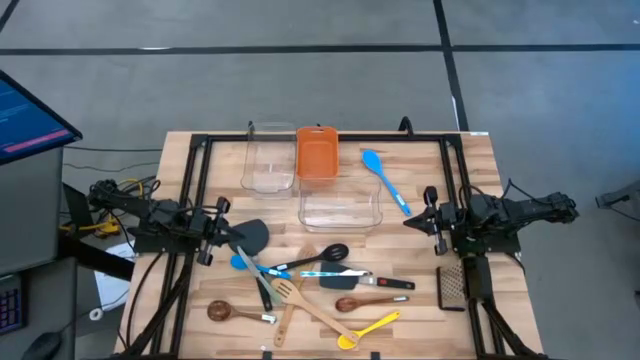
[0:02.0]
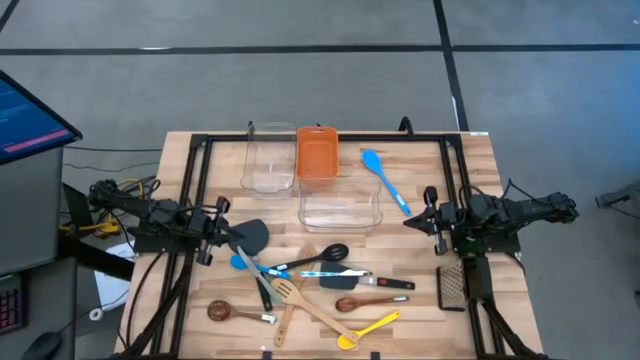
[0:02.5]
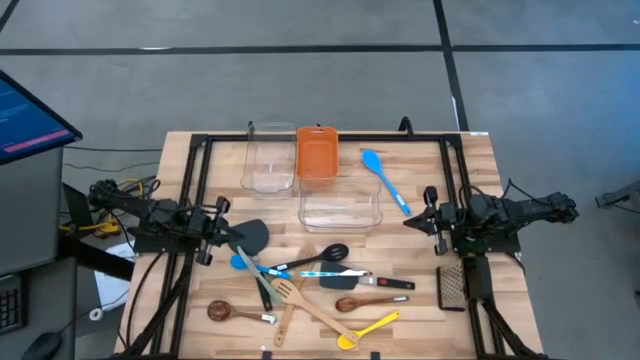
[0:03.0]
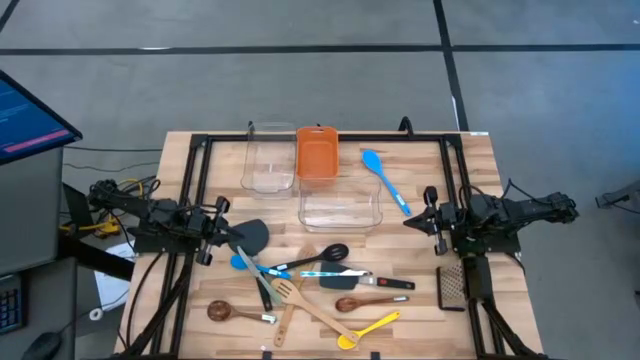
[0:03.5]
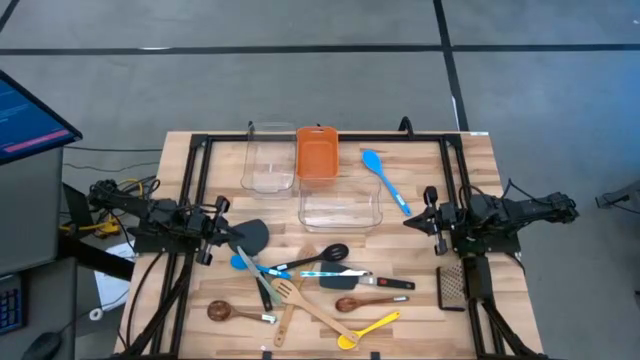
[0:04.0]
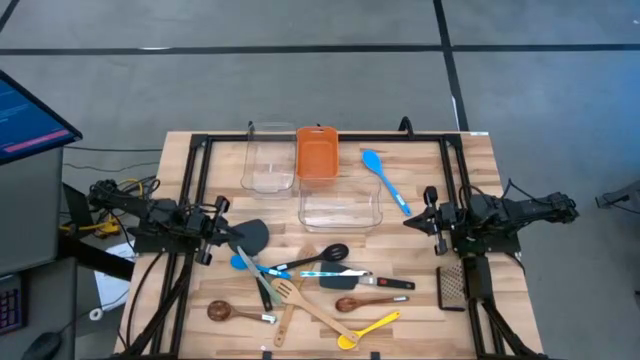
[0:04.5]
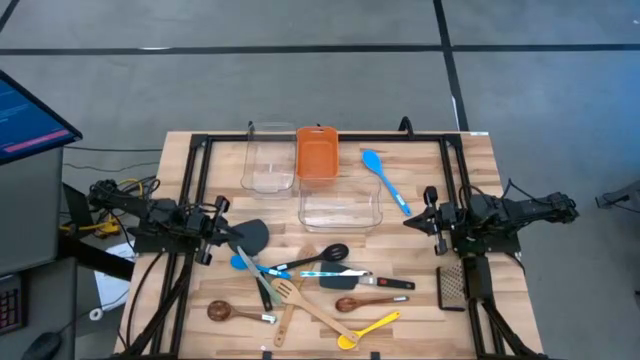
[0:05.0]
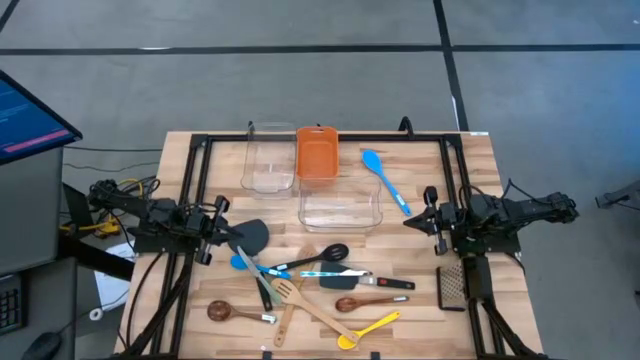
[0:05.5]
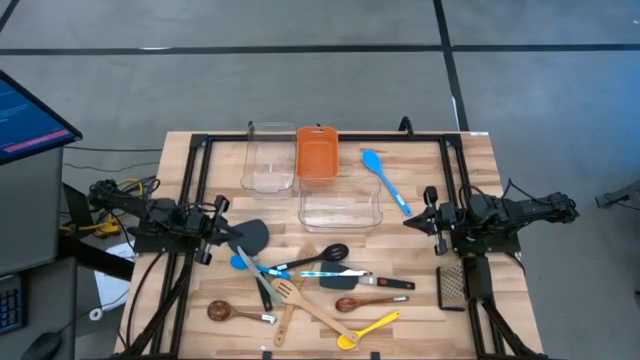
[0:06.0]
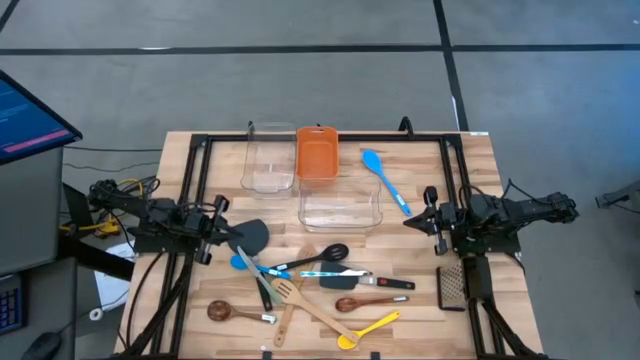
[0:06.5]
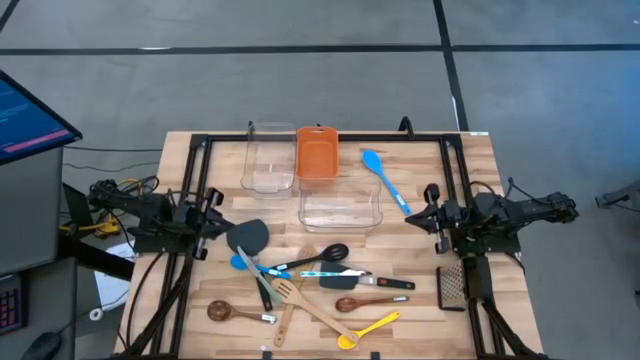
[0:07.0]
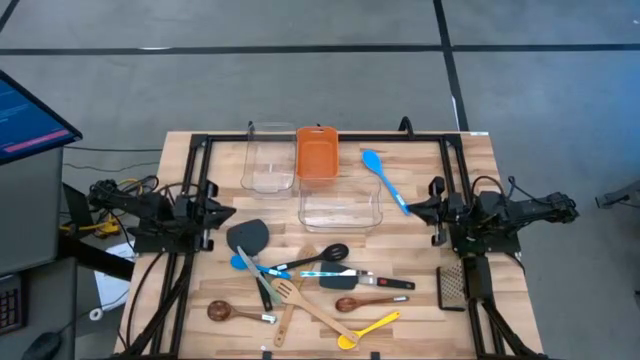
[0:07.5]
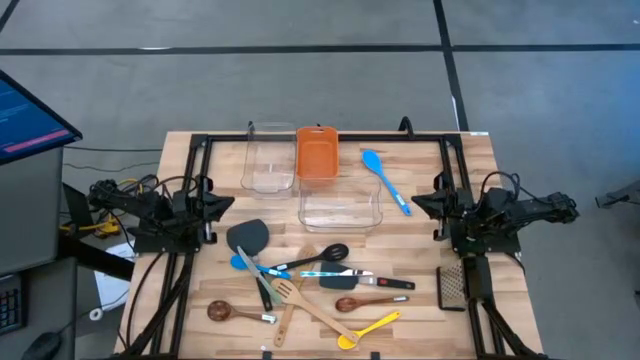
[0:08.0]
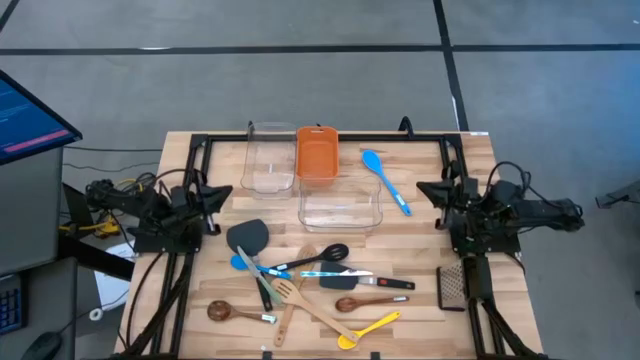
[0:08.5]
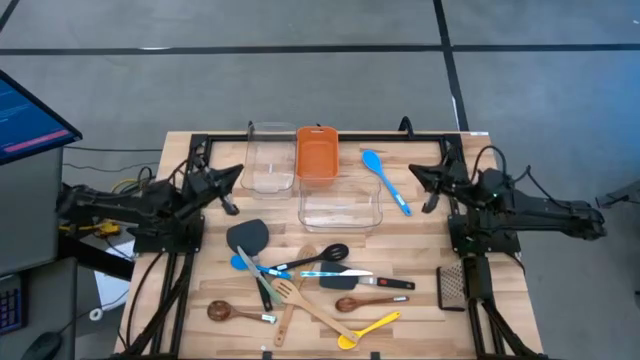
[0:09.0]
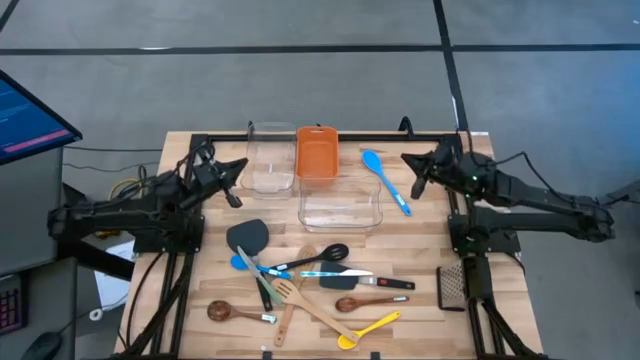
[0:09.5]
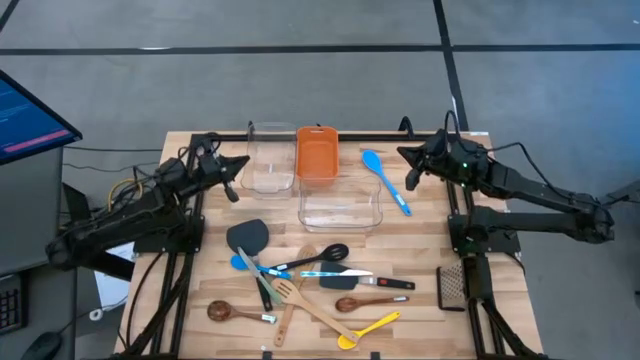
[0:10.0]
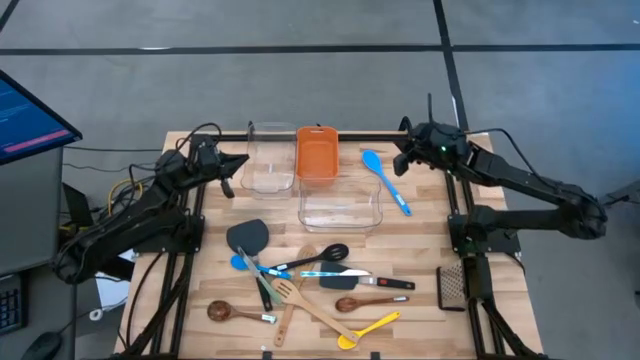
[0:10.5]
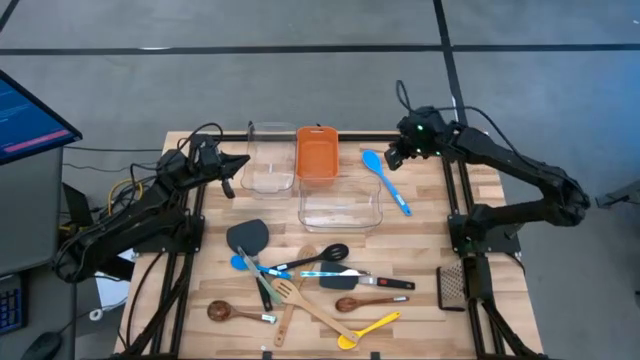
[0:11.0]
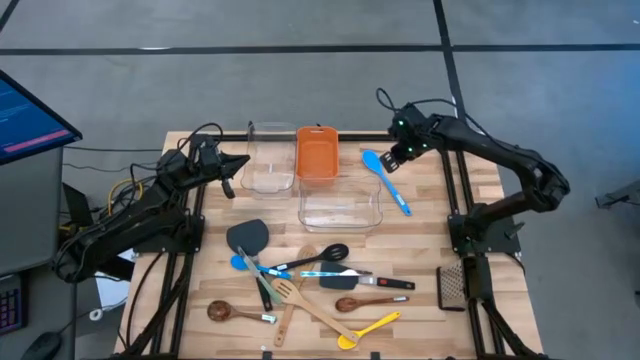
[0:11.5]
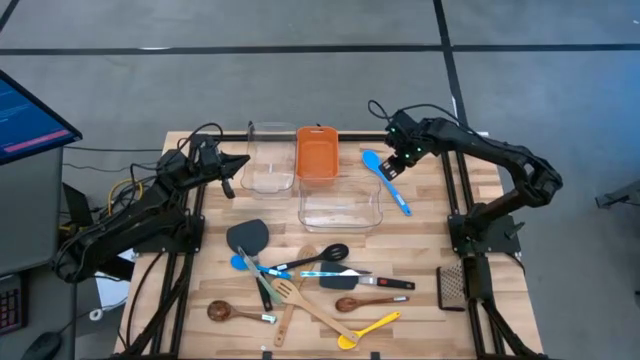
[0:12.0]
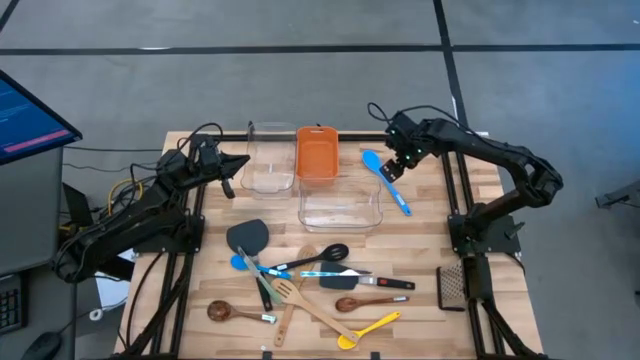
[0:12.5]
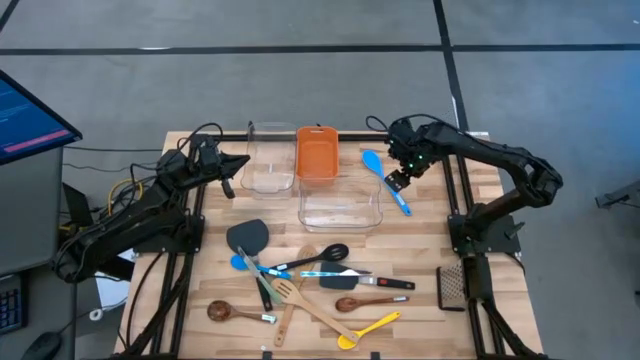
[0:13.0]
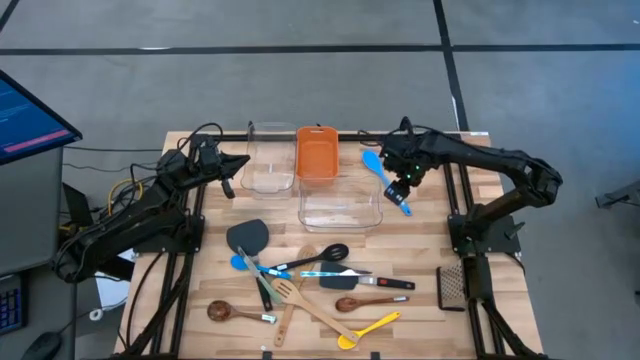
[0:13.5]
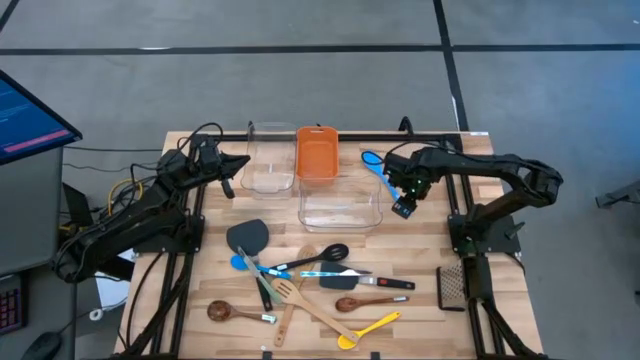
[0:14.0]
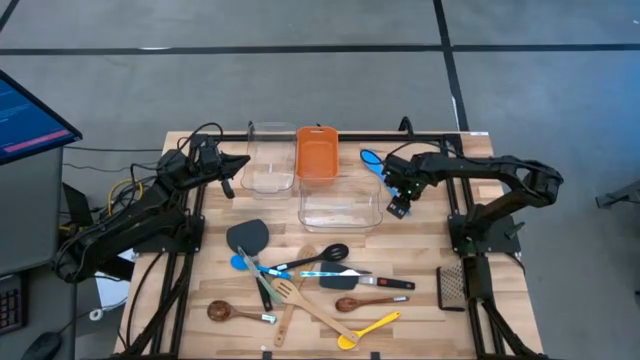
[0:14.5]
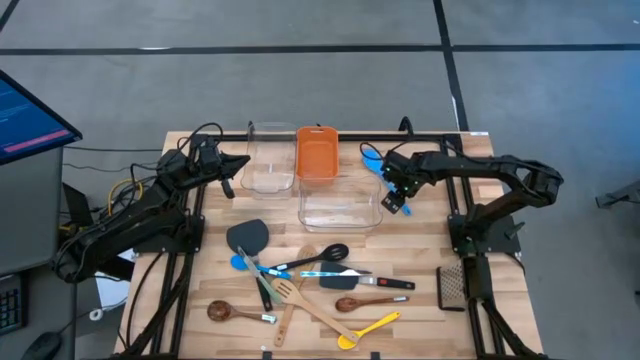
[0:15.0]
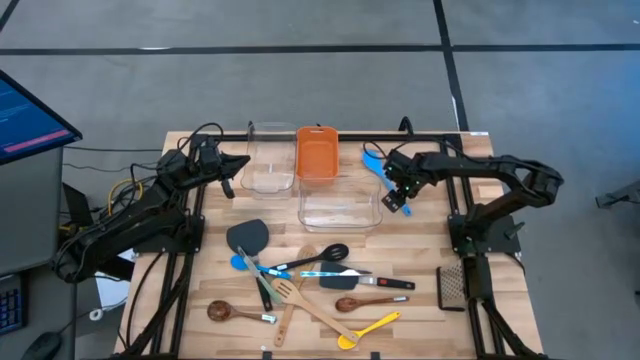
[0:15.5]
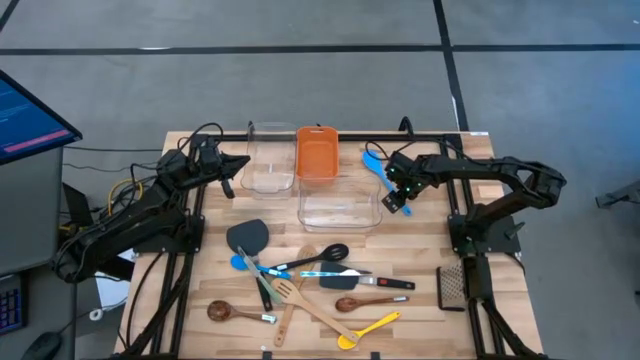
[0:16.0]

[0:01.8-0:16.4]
Task: Pick & Place Kitchen Items
Put the top blue serving spoon into the top transparent bin

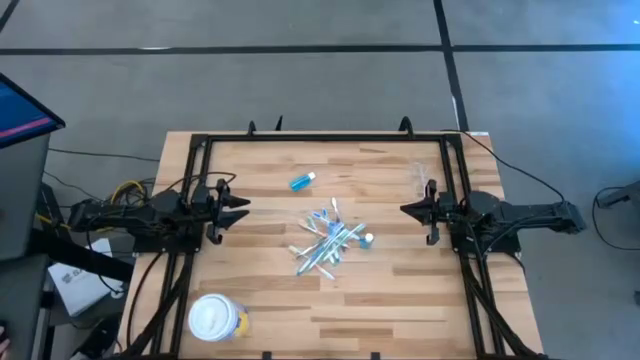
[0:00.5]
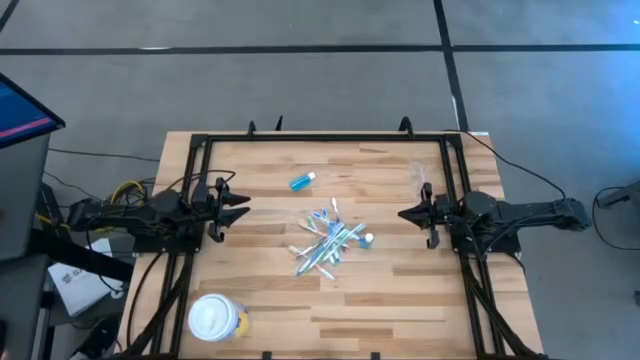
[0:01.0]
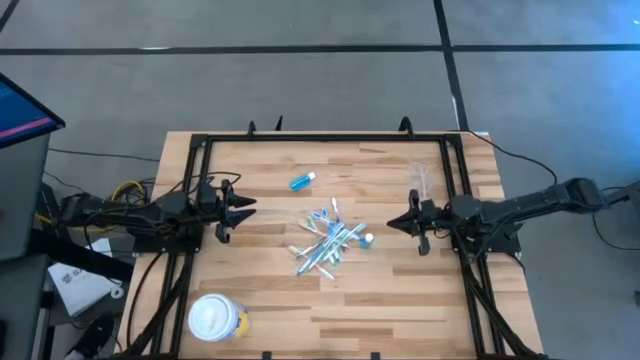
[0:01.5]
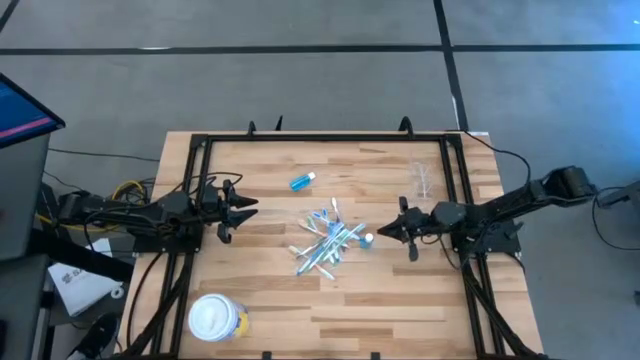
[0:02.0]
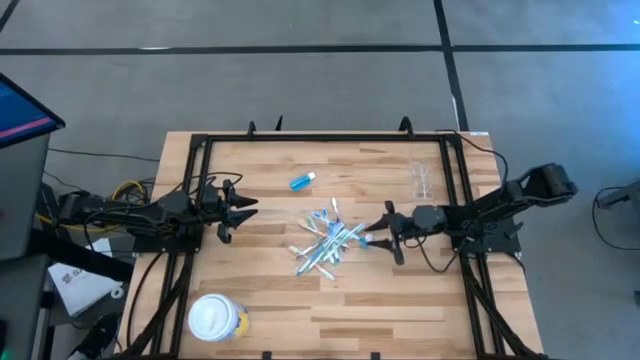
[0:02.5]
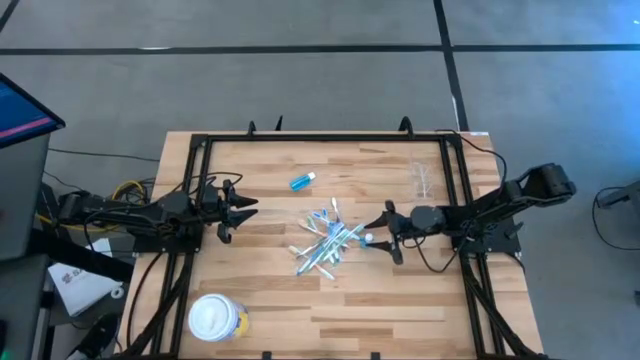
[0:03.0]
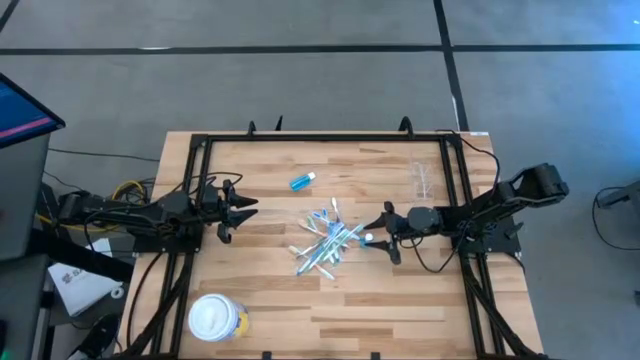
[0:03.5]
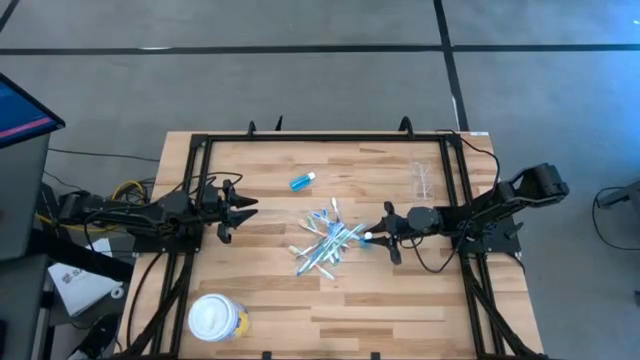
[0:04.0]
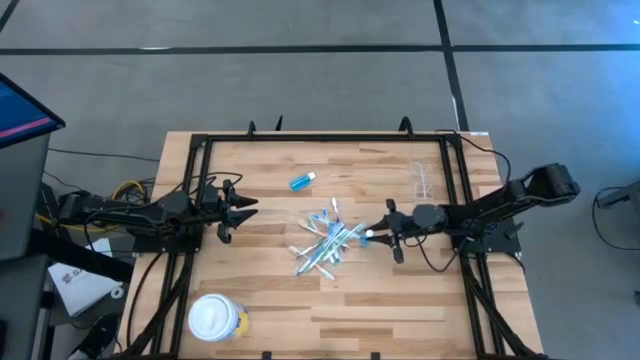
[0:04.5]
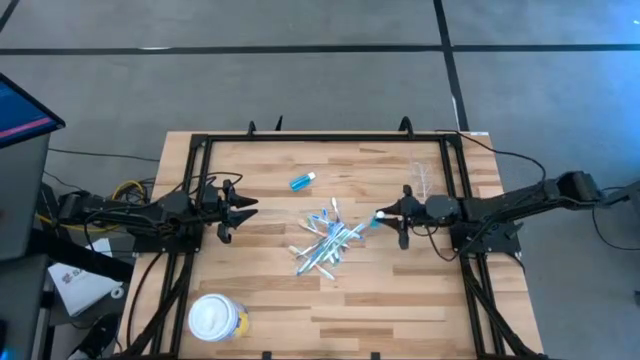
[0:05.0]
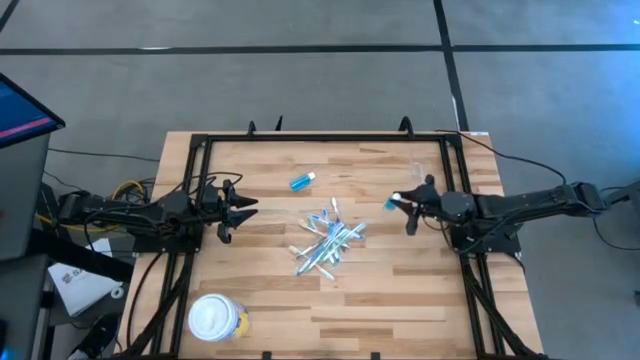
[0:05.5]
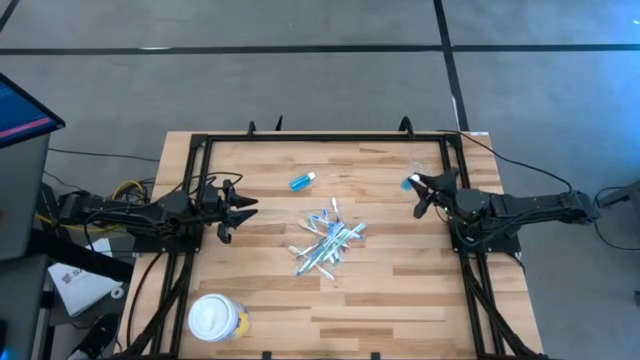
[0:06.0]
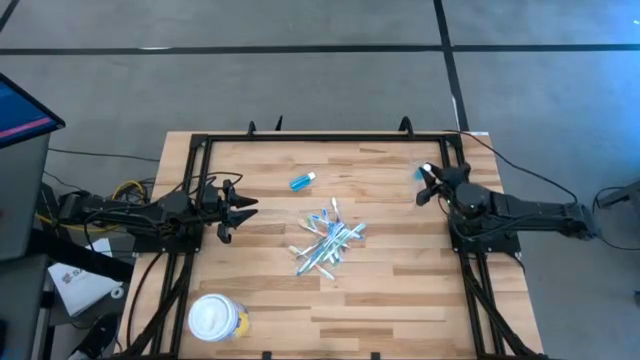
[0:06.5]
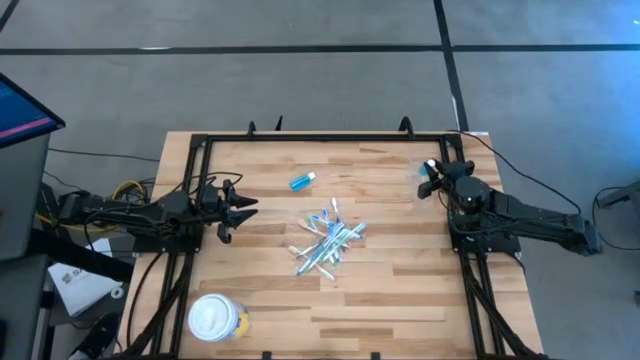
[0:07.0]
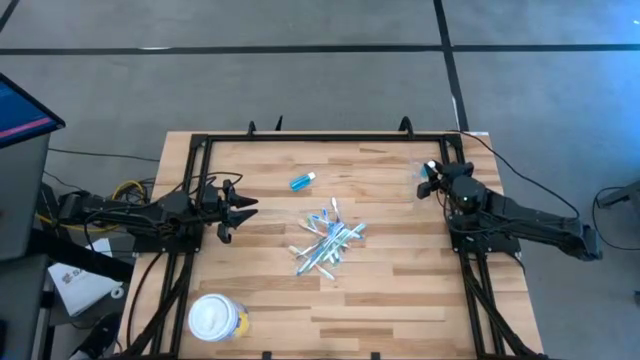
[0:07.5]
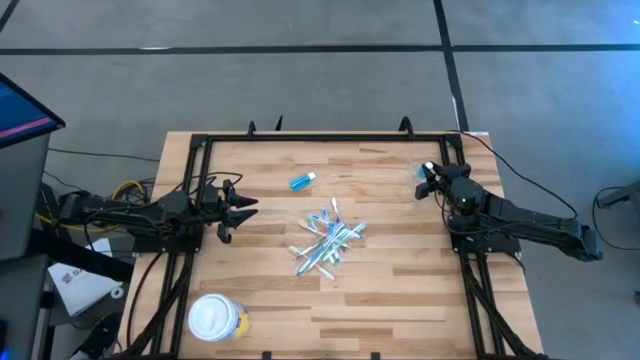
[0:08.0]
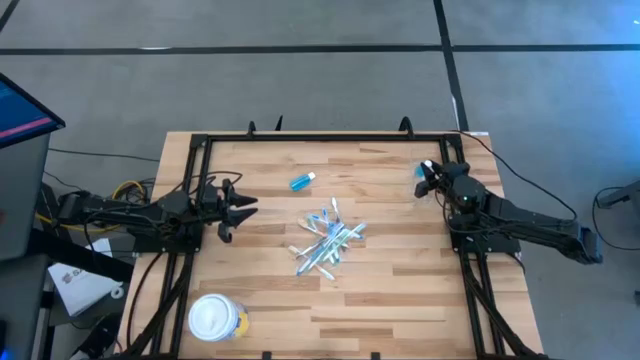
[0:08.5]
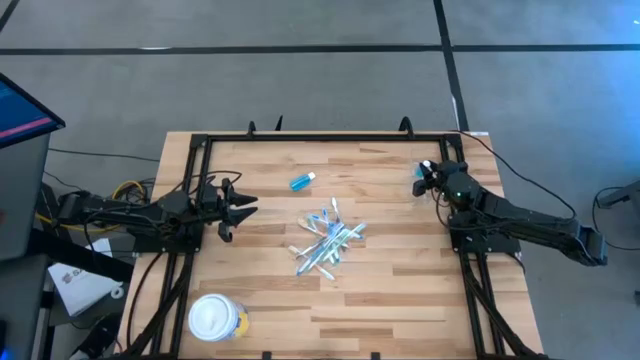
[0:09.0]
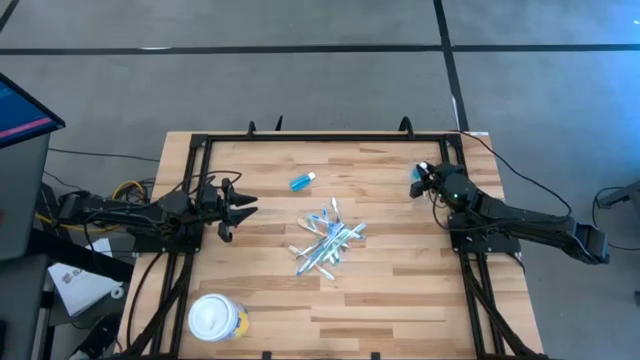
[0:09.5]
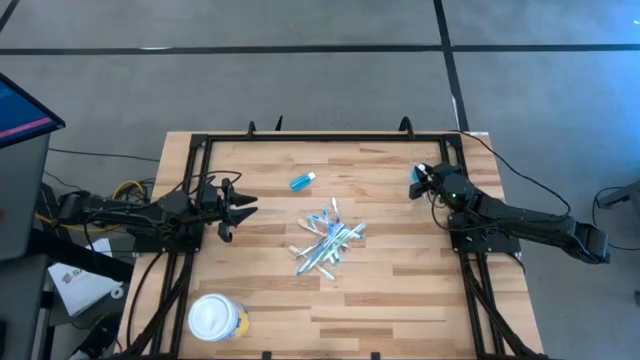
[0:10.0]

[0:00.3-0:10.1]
Task: Pick & Place toothbrushing station
Put the blue mouthwash into the transparent organizer
